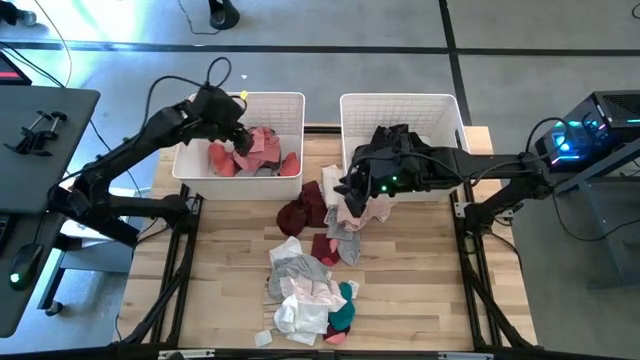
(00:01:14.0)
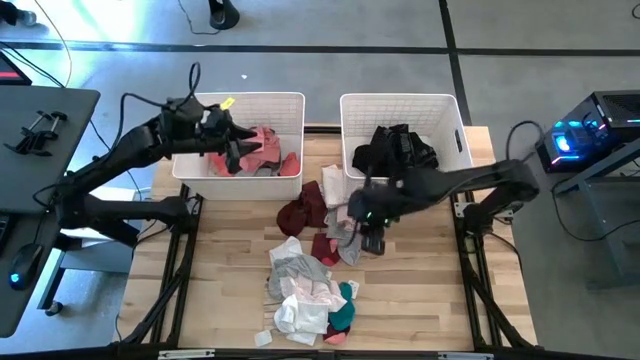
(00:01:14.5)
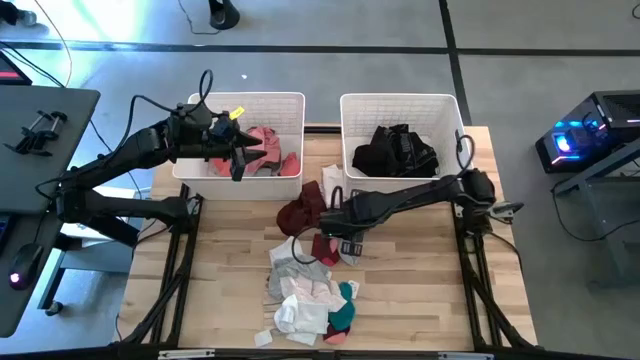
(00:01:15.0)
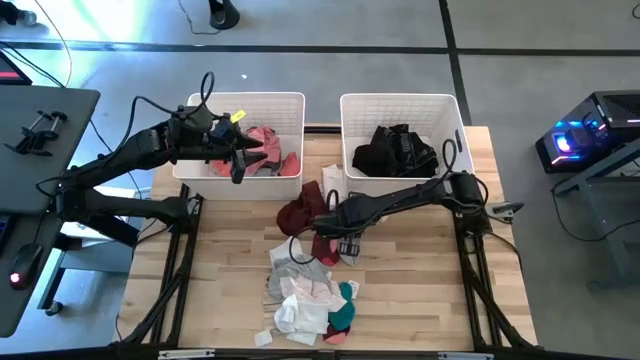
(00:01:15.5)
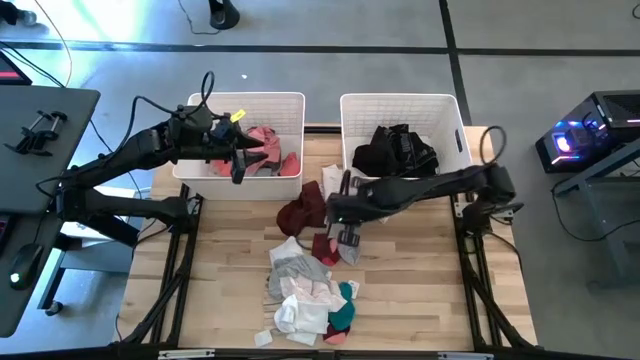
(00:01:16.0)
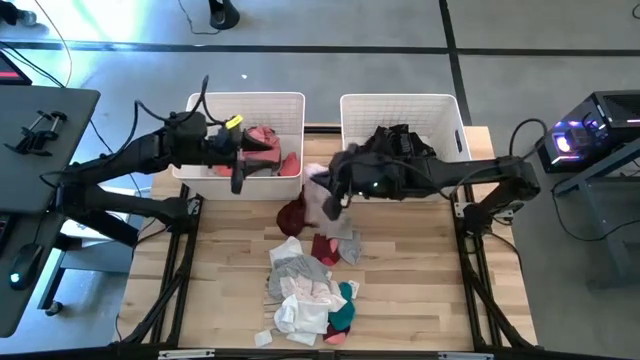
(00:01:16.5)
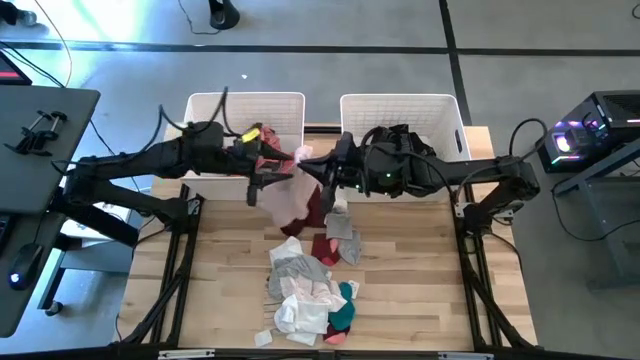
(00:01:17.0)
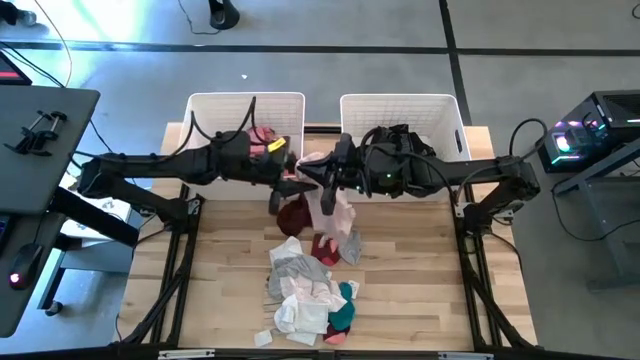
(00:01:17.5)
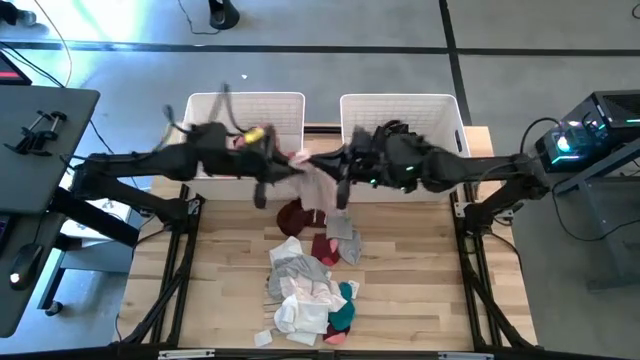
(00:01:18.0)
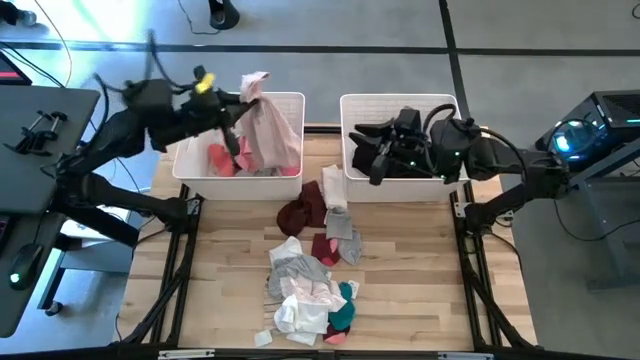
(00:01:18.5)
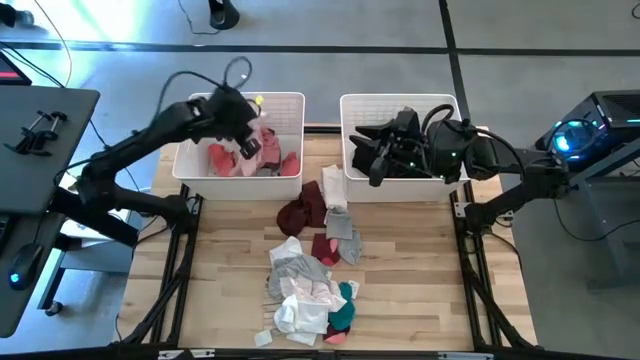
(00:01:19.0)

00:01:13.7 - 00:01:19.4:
Task: Sort clothes
Put the light pink underwear into the left white laundry bin

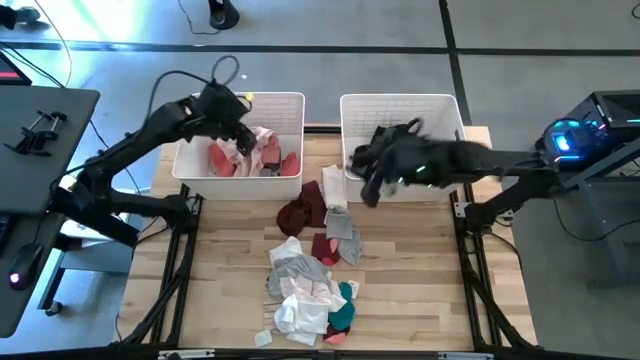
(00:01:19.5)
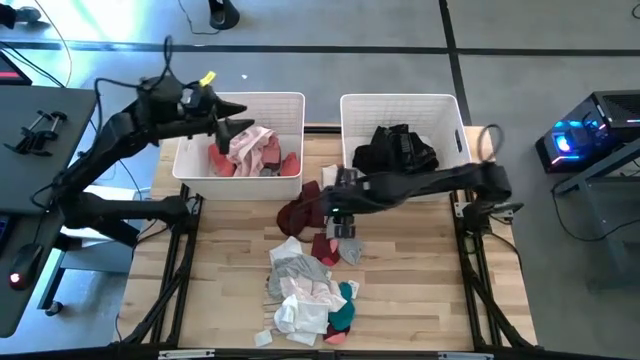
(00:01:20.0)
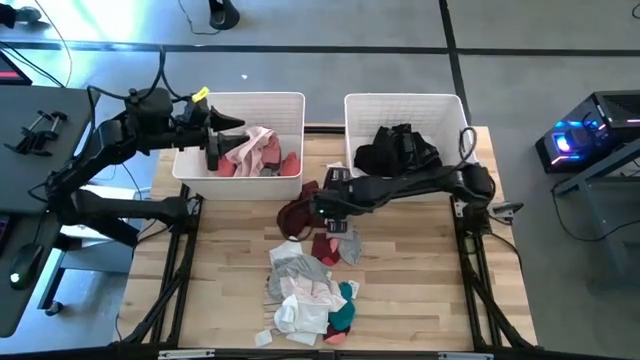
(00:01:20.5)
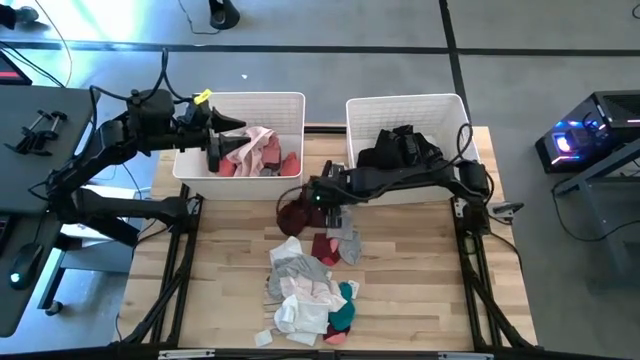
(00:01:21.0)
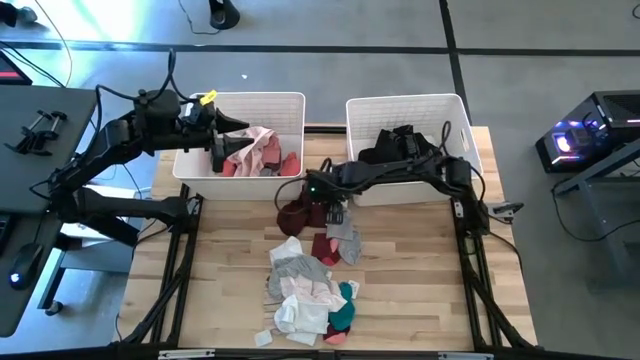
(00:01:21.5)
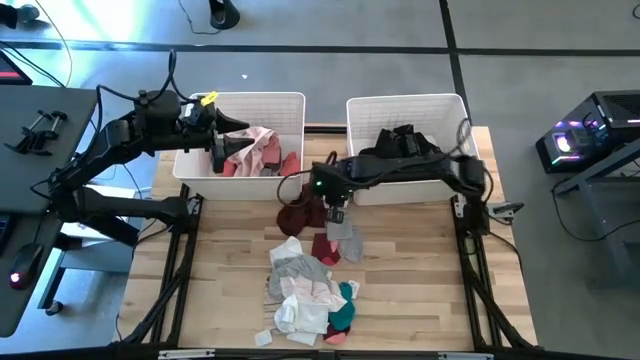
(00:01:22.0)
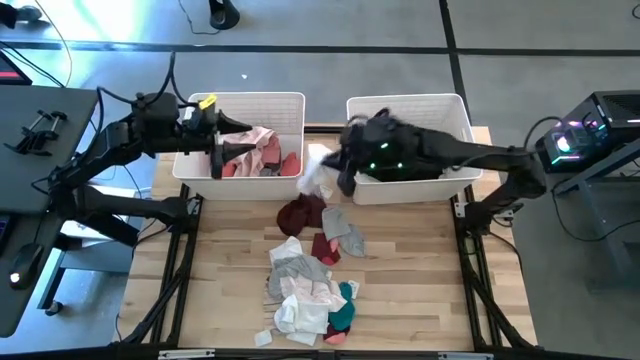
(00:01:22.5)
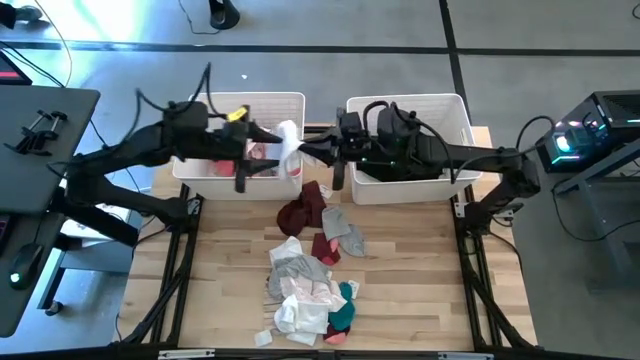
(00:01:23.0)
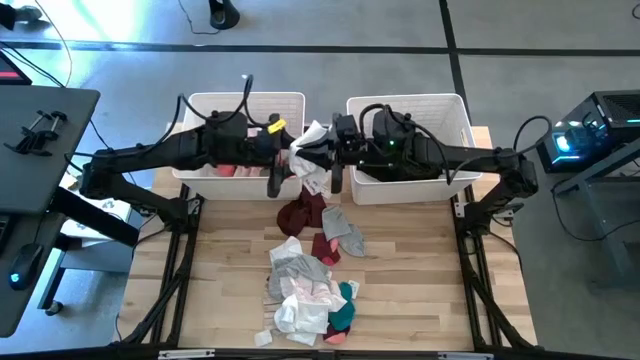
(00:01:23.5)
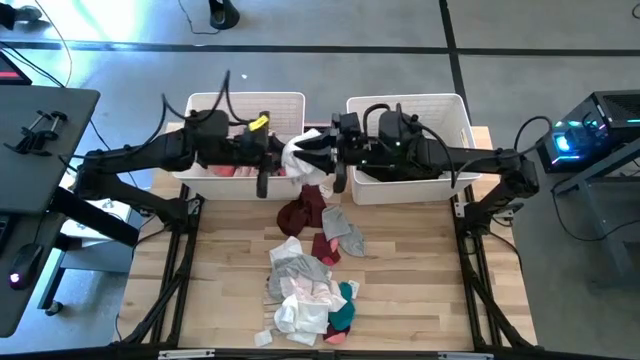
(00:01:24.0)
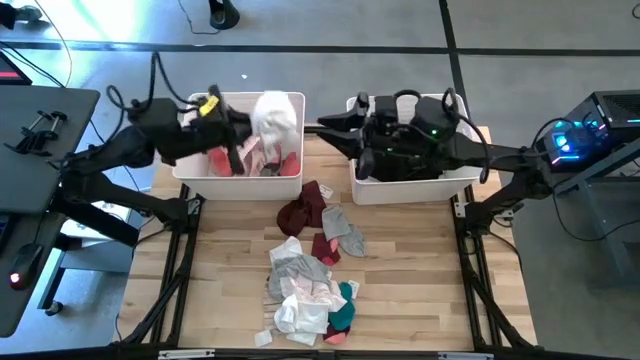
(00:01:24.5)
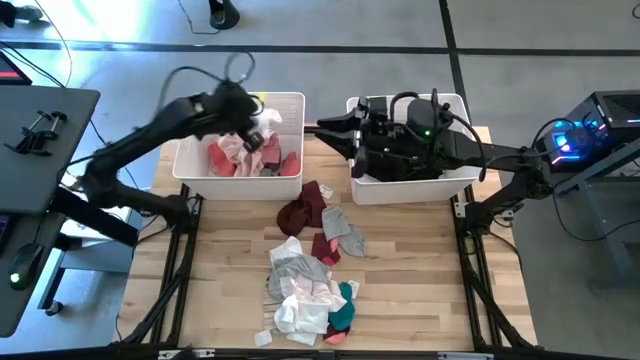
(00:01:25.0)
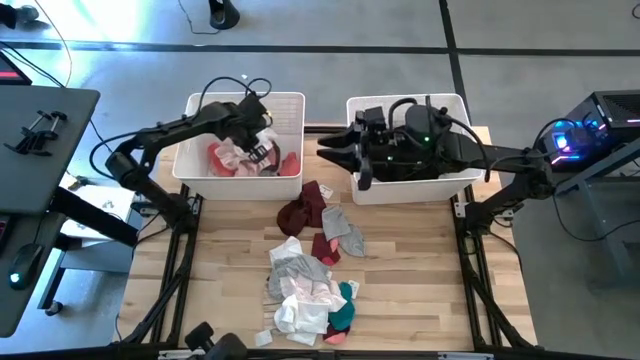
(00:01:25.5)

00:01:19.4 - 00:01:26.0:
Put the white underwear into the left white laundry bin

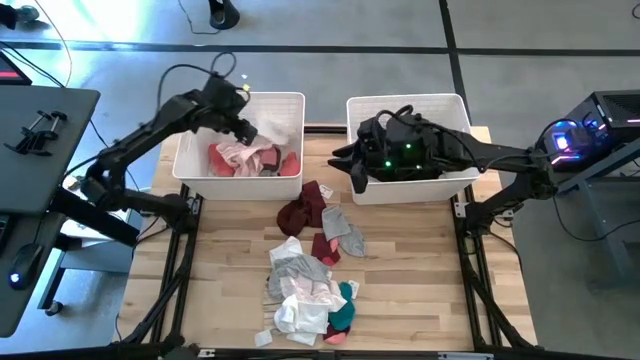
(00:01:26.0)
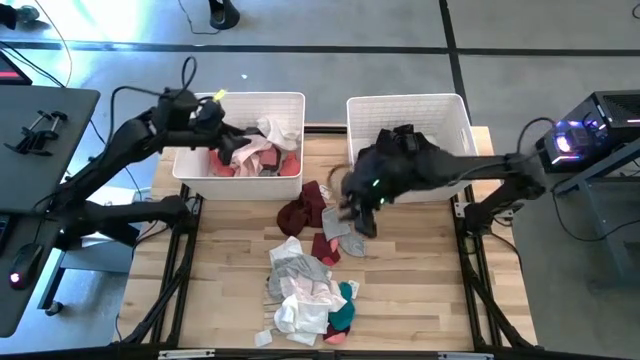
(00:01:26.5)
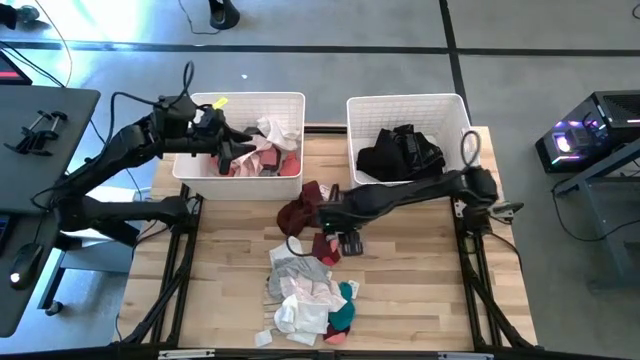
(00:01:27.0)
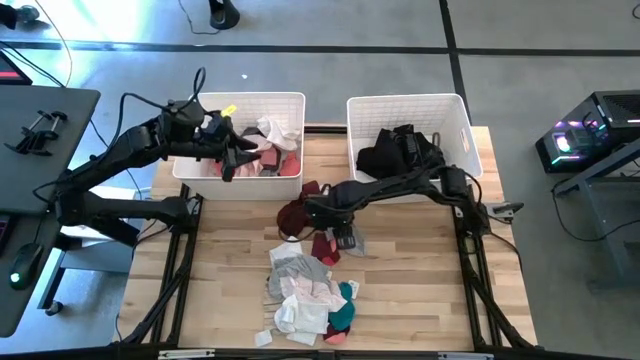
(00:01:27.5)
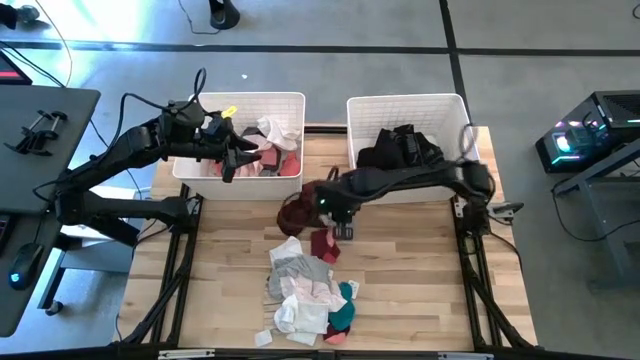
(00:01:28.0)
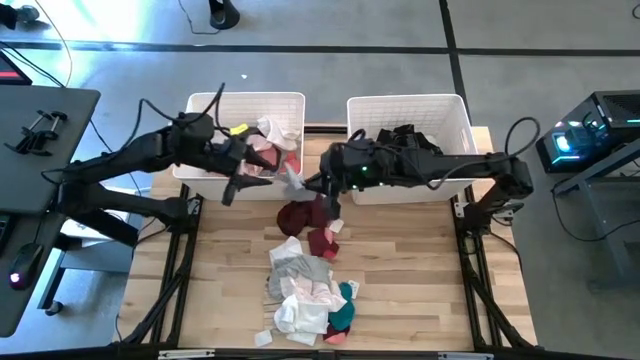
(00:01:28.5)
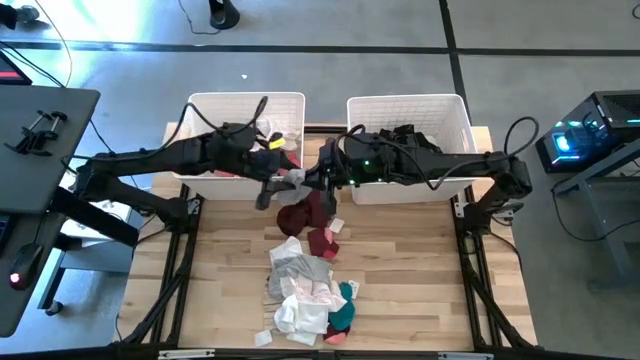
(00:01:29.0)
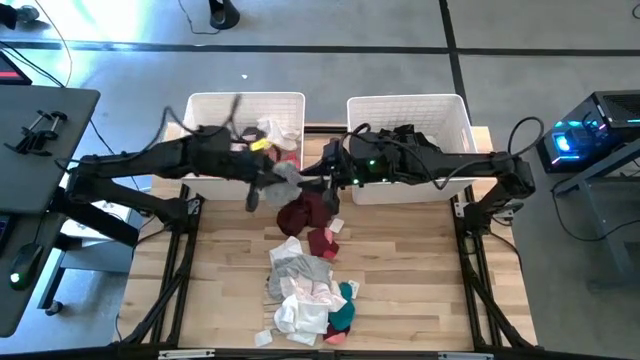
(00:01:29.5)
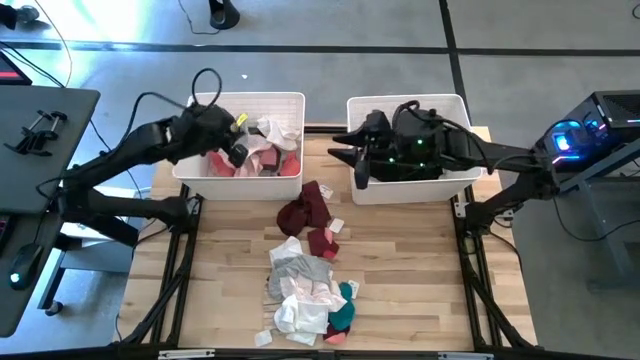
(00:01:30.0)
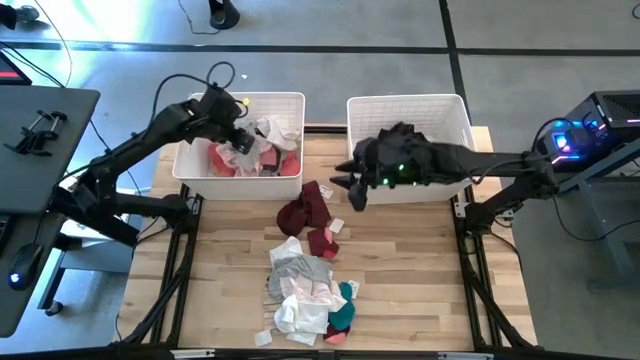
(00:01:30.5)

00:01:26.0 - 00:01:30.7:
Put the gray sock into the left white laundry bin

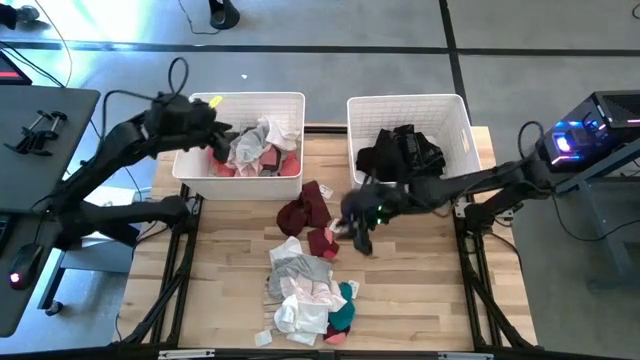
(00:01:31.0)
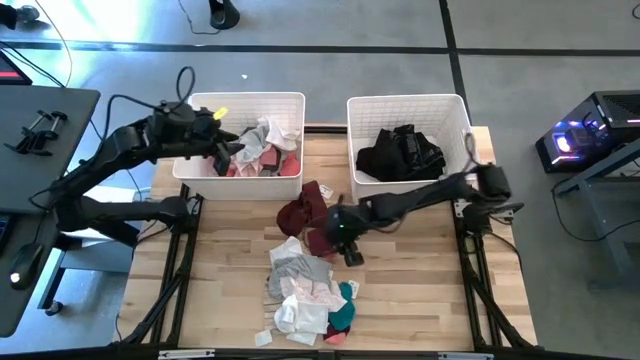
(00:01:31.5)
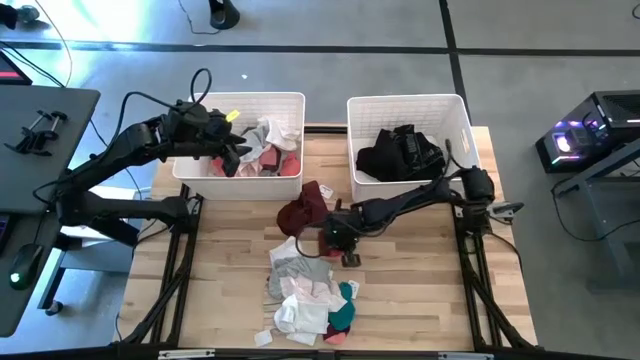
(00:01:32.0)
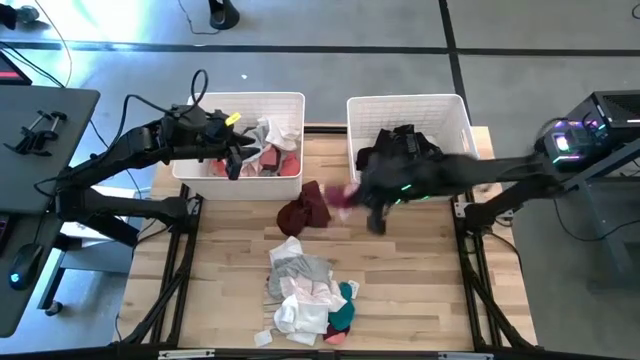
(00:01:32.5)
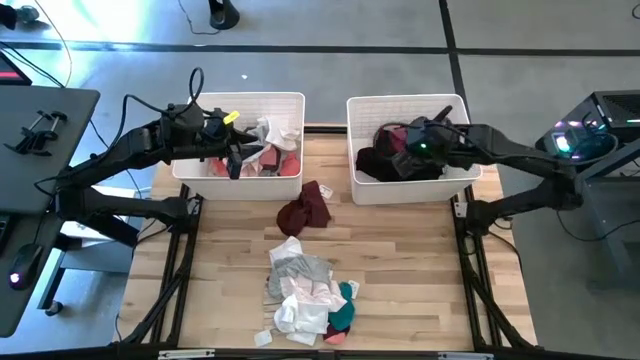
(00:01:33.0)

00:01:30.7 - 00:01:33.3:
Put the dark red sock into the right white laundry bin

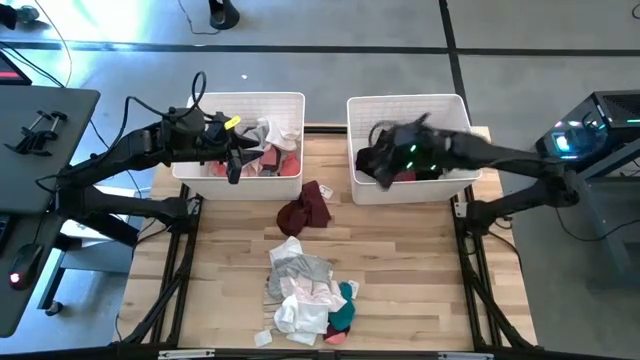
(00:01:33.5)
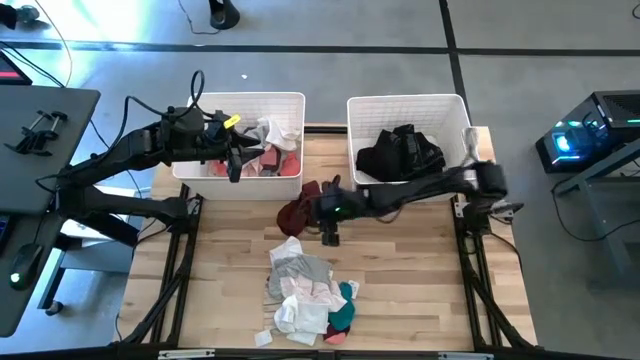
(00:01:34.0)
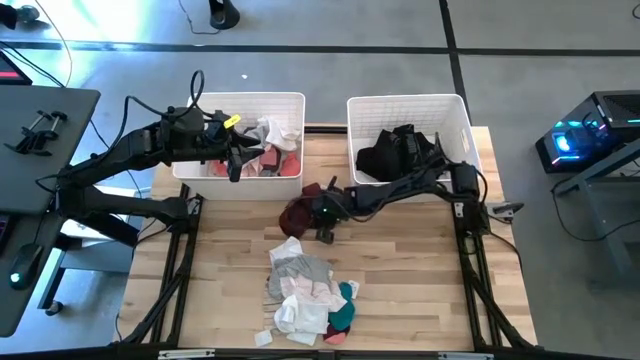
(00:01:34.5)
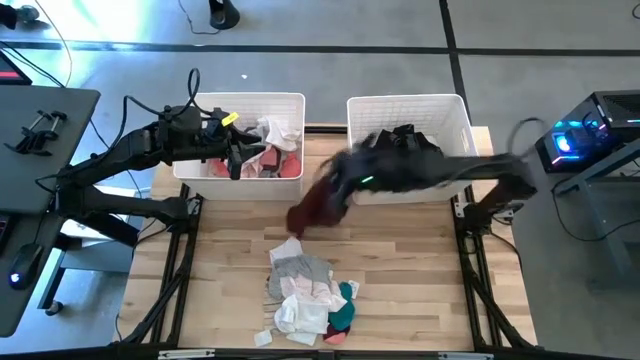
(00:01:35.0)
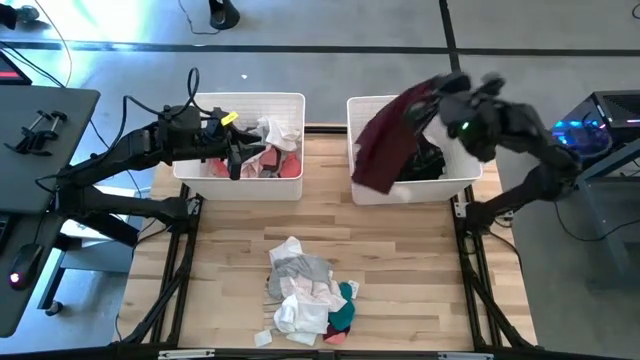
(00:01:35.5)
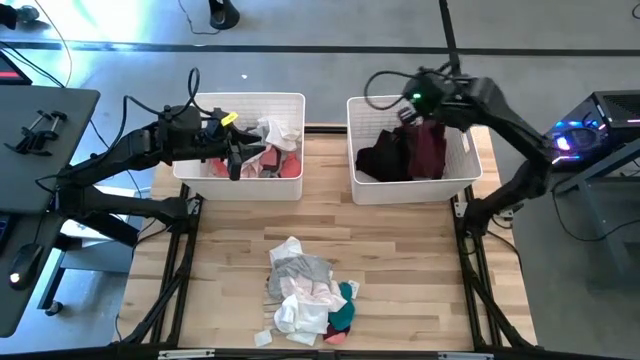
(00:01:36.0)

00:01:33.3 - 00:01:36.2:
Put the dark red underwear into the right white laundry bin
